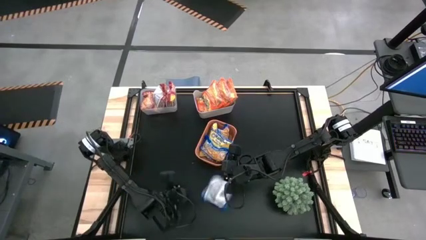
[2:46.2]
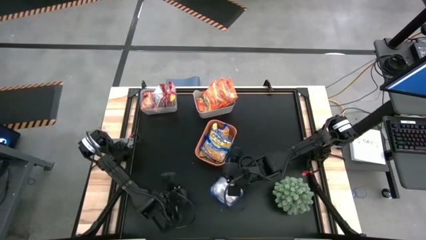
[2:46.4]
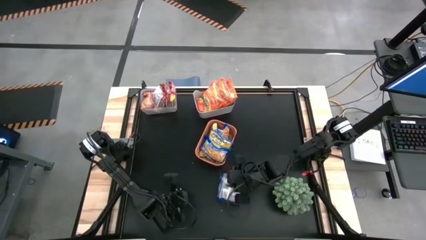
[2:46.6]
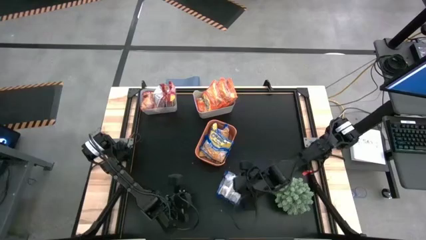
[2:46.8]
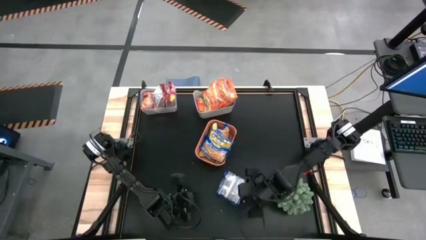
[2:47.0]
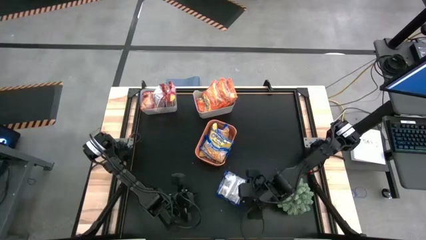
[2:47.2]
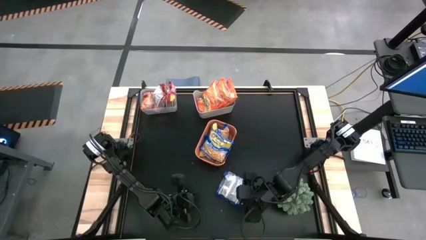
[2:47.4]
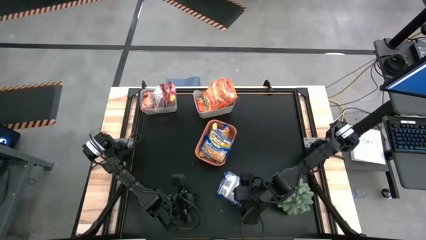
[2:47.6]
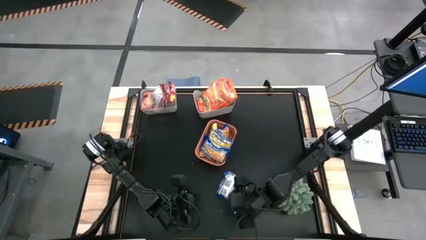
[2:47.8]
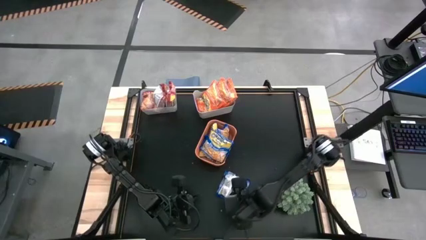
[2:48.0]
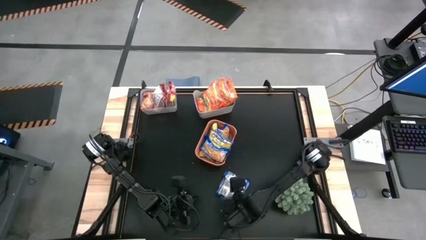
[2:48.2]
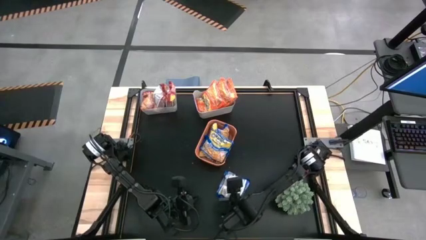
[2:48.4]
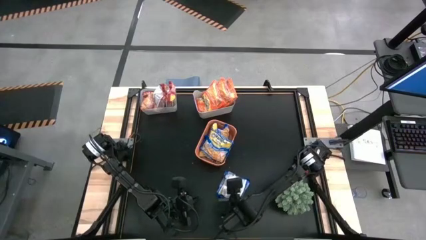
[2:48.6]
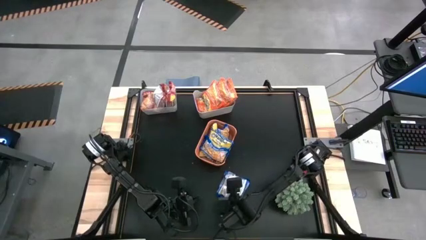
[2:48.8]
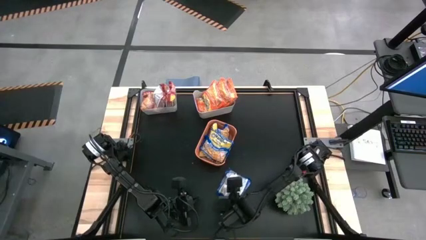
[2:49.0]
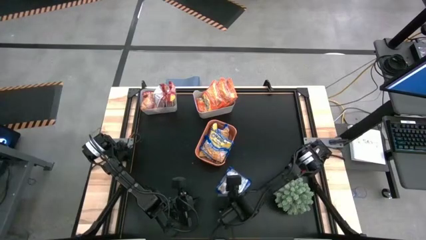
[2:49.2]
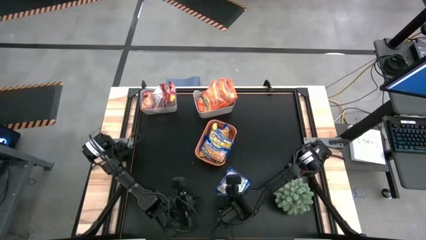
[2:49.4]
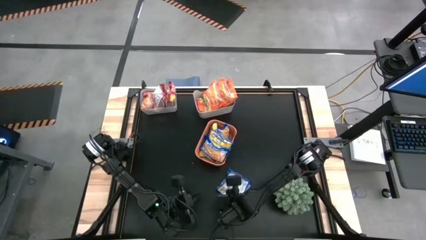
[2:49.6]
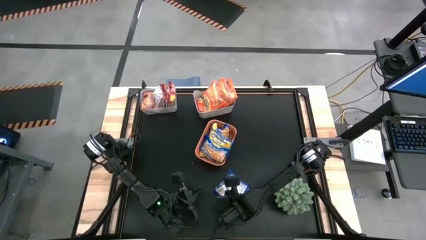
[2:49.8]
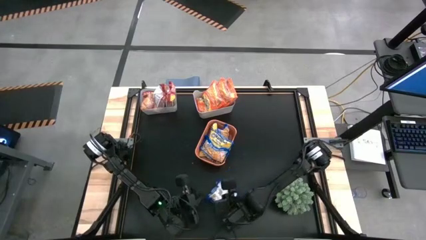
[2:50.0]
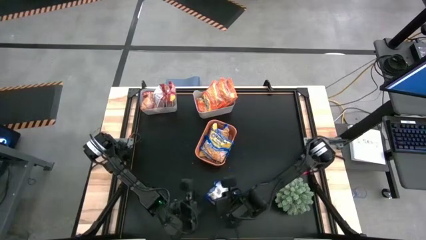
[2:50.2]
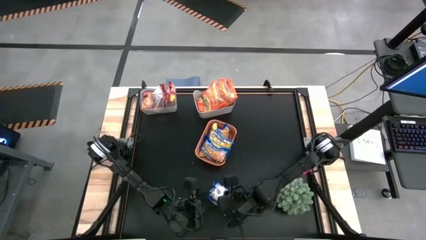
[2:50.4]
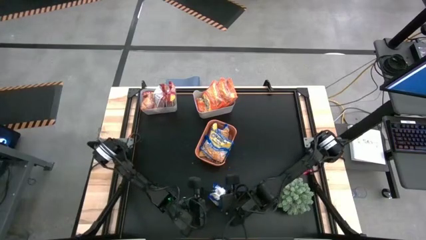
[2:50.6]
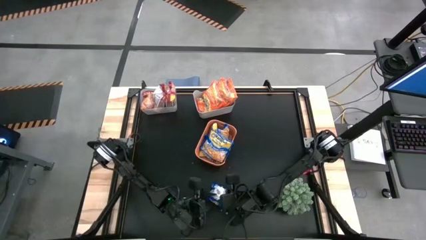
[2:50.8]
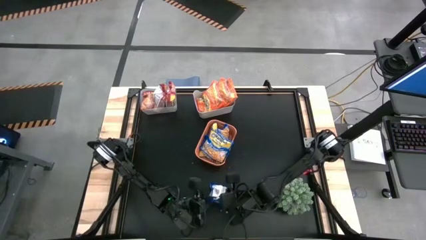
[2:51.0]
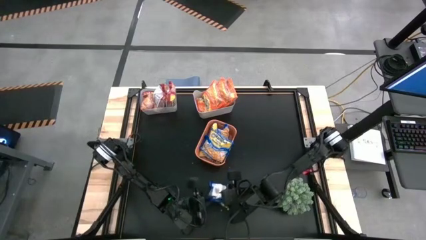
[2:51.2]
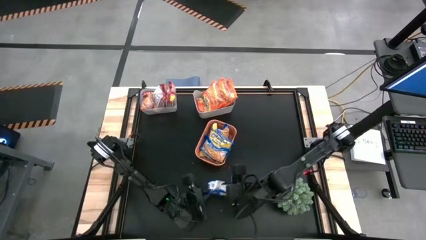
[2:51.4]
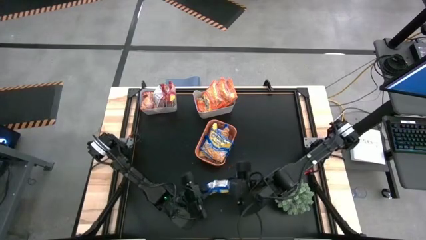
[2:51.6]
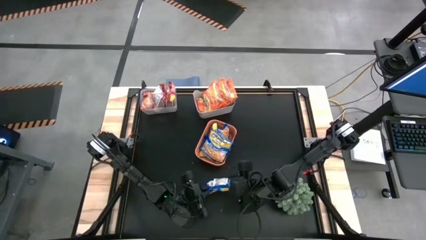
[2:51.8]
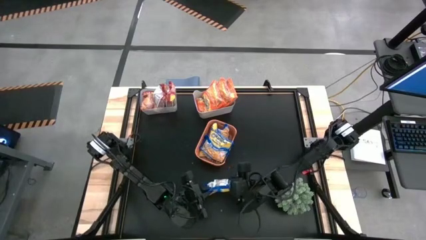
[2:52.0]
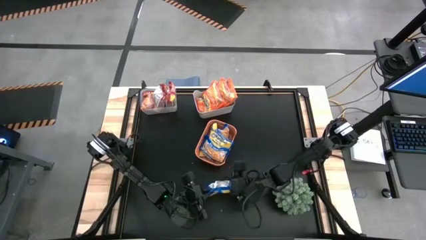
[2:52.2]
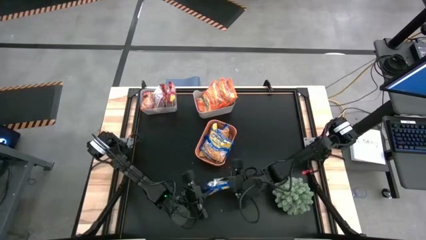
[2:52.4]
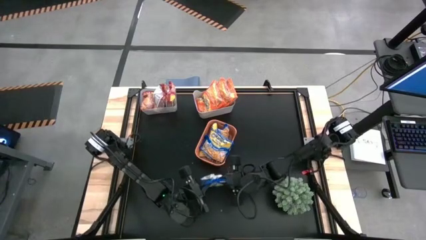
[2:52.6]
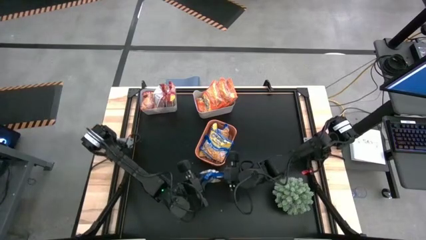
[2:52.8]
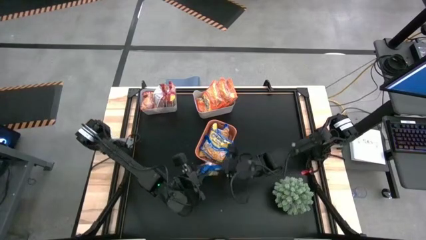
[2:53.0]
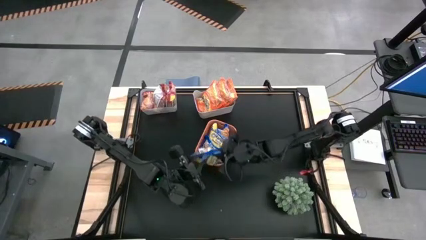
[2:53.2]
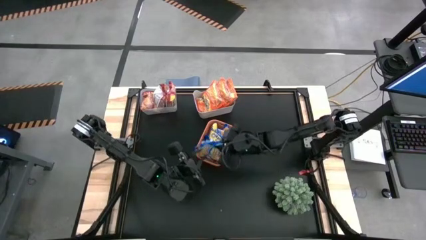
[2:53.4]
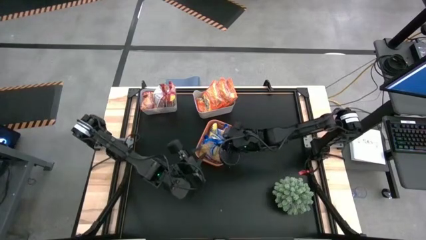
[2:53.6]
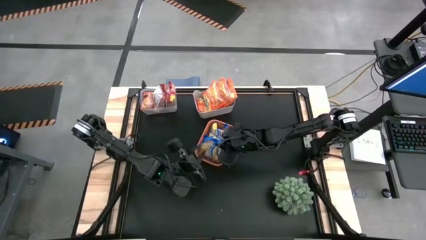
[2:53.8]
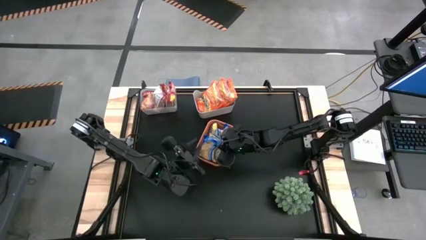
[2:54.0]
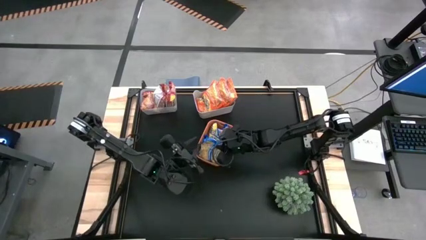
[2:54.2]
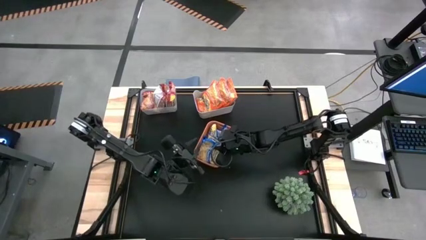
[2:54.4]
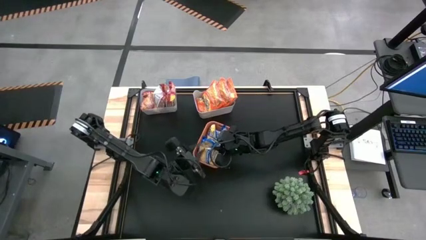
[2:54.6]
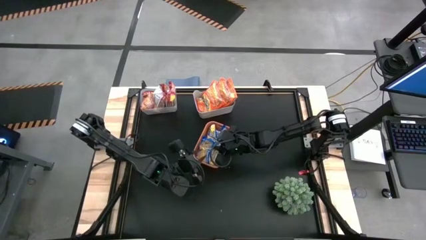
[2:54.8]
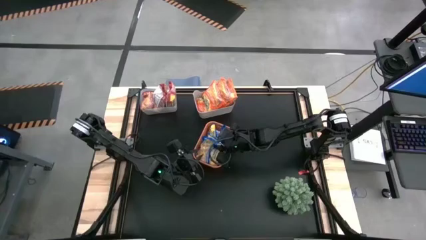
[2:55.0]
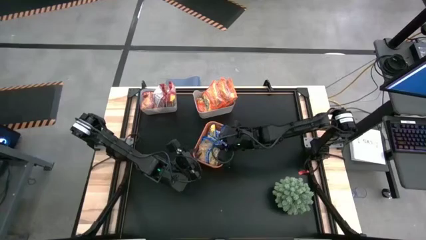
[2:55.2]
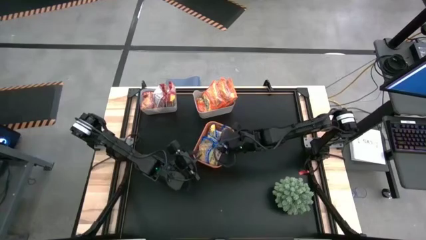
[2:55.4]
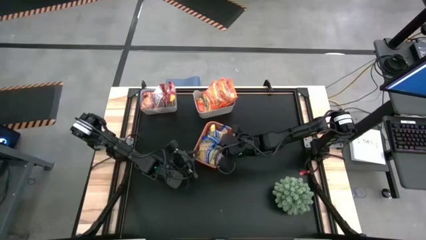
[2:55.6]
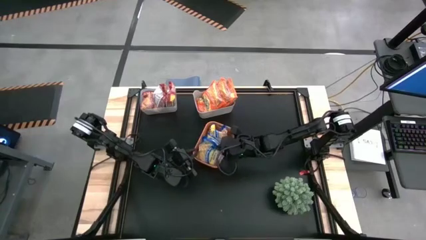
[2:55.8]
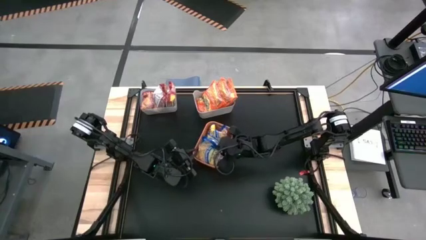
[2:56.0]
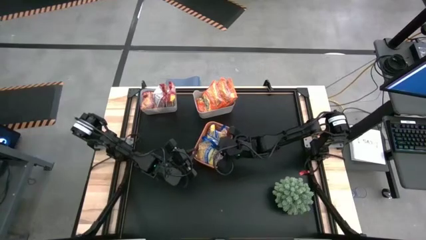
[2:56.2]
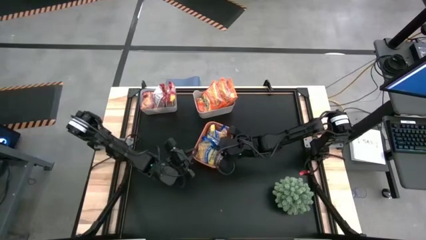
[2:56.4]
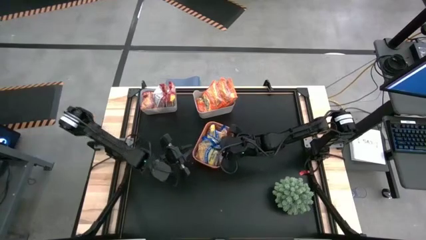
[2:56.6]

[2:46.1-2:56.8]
Task: Sort Maruchan noodles
Put the blue bag into the orange bin

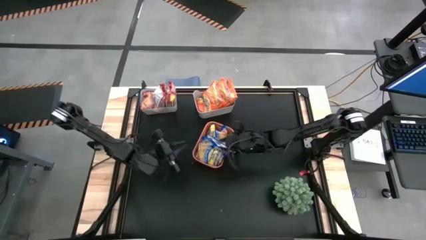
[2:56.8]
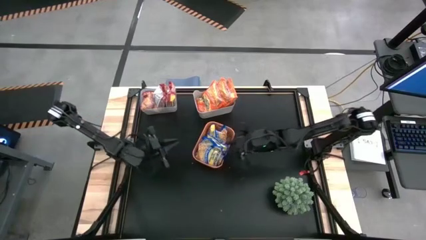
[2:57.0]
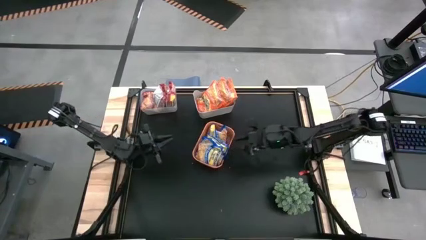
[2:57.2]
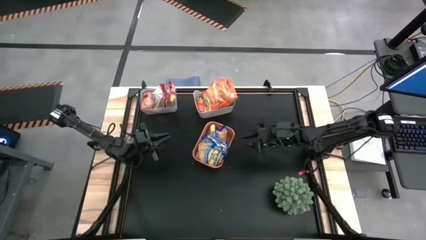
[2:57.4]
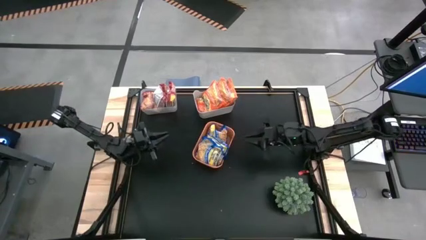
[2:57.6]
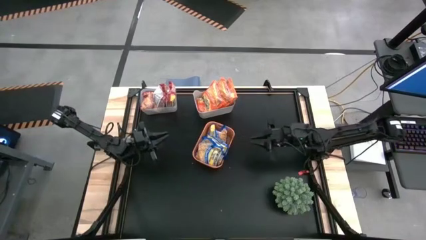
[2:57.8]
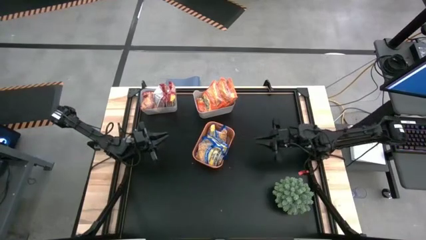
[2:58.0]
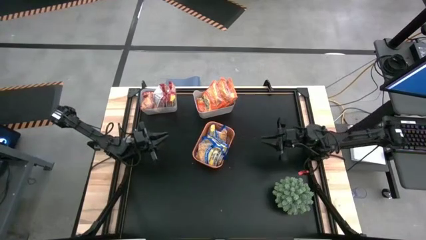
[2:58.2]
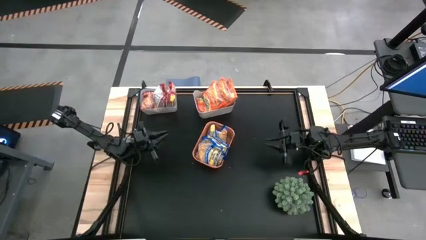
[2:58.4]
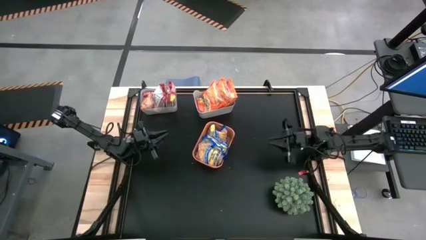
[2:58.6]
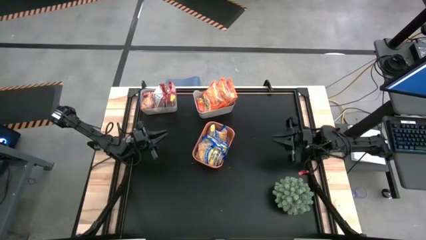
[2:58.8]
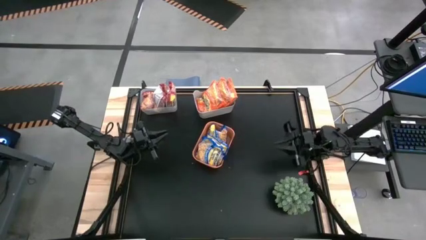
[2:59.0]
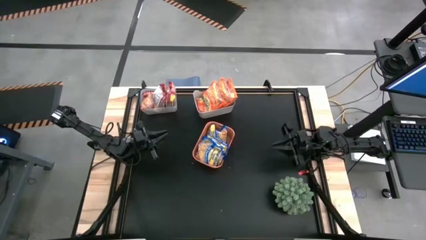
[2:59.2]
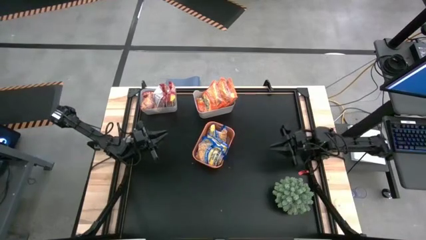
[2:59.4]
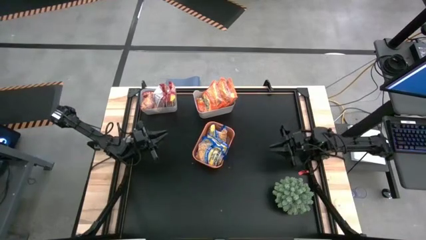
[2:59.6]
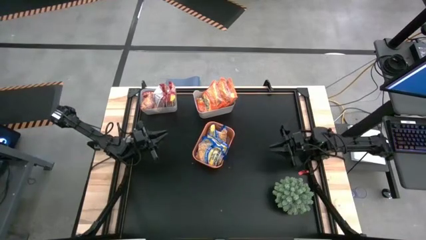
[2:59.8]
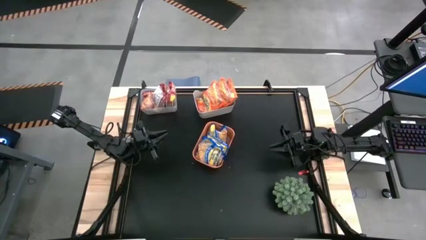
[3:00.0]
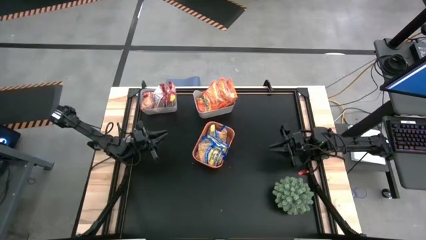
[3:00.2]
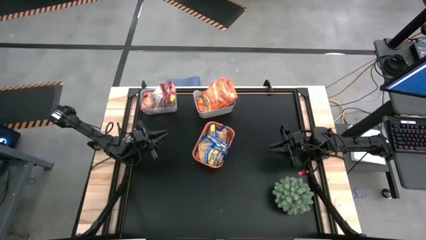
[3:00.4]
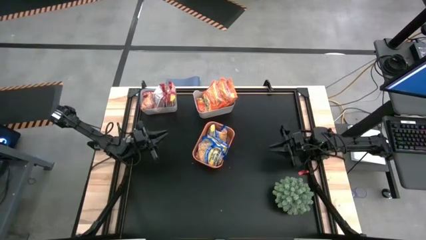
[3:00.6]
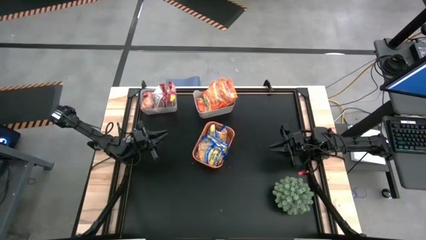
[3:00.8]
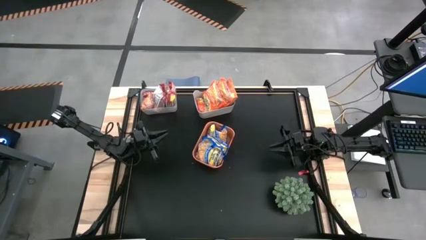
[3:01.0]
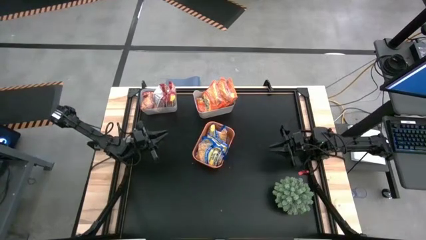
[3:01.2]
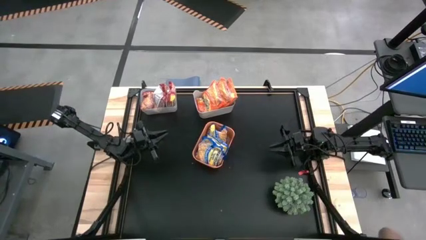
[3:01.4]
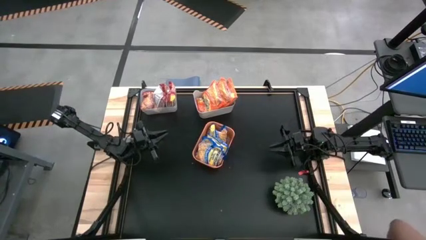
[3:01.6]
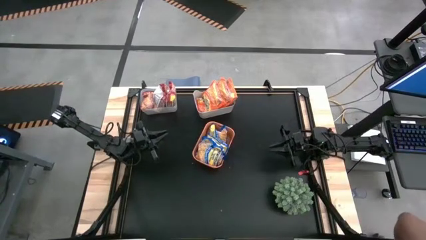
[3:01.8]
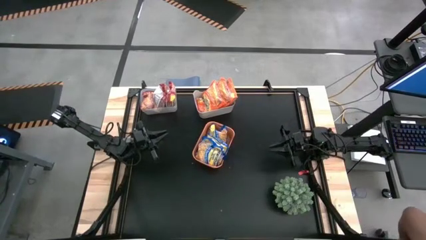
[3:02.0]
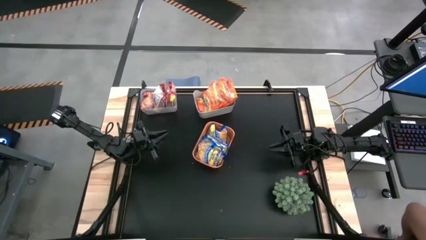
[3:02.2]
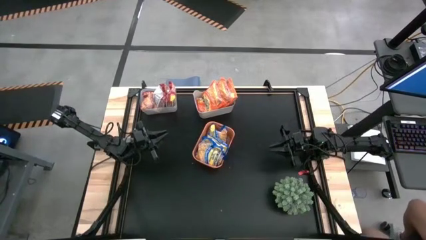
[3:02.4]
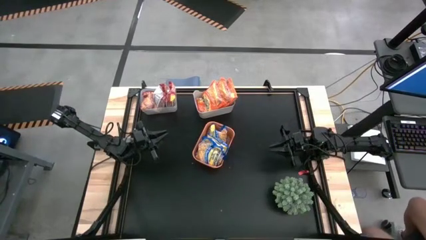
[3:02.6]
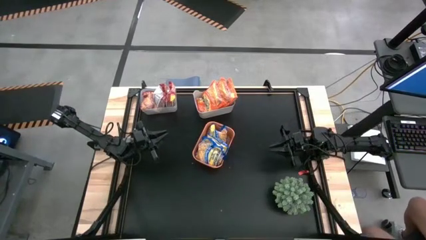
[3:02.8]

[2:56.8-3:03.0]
Return to Home Position
